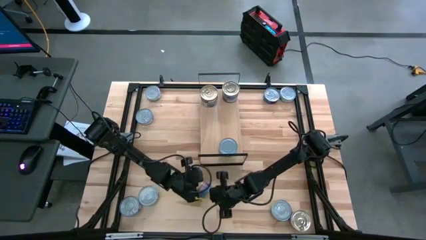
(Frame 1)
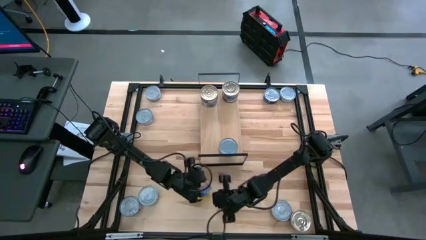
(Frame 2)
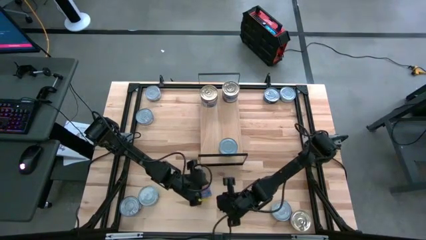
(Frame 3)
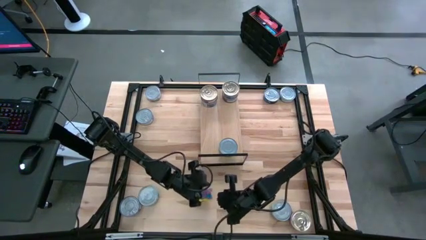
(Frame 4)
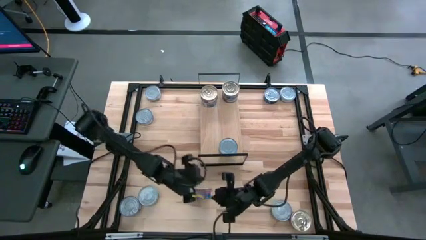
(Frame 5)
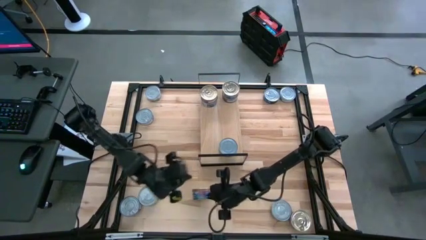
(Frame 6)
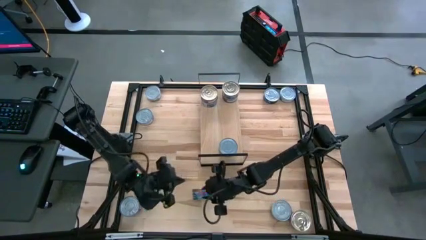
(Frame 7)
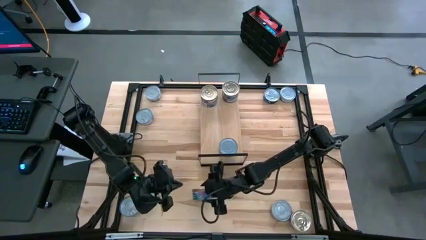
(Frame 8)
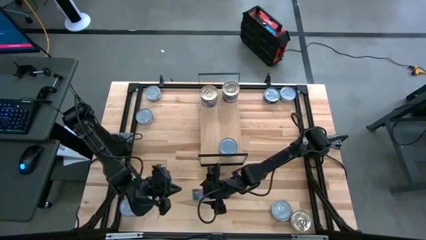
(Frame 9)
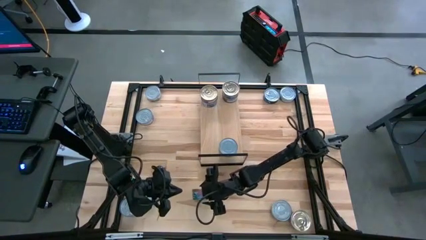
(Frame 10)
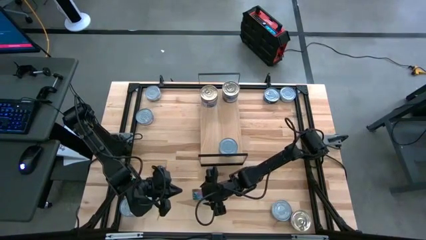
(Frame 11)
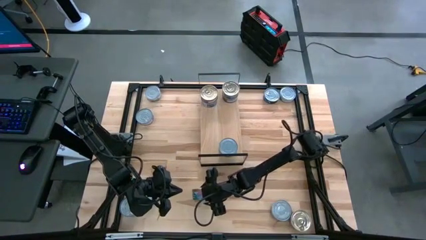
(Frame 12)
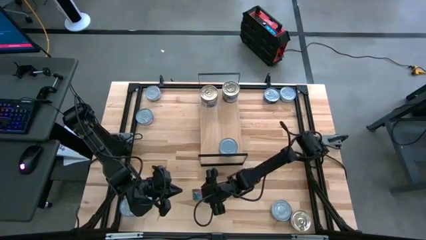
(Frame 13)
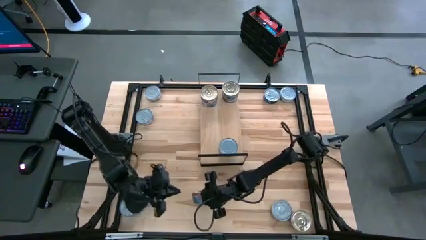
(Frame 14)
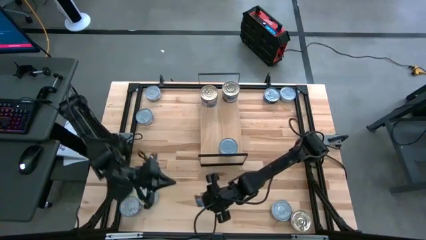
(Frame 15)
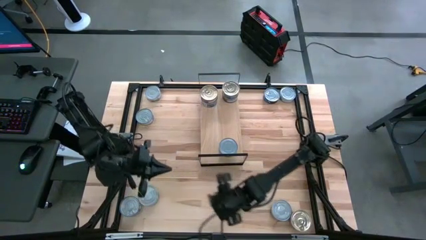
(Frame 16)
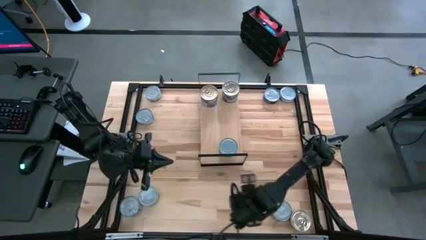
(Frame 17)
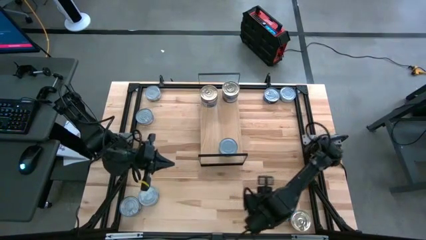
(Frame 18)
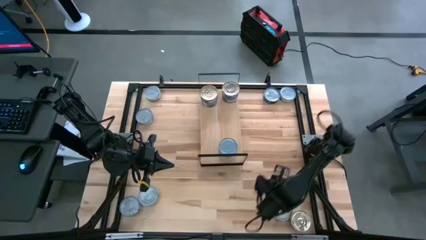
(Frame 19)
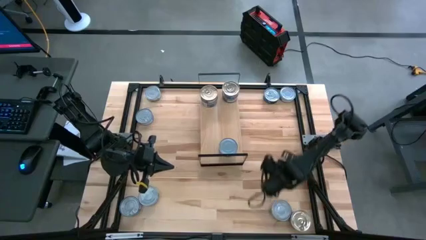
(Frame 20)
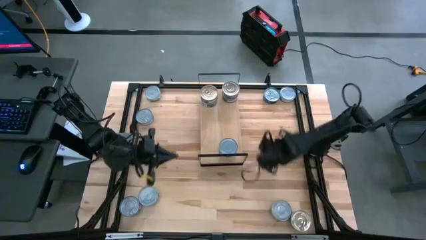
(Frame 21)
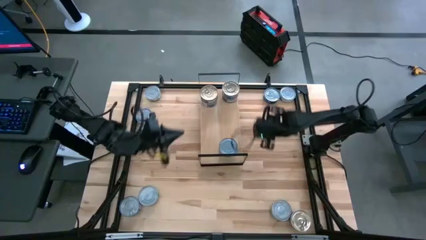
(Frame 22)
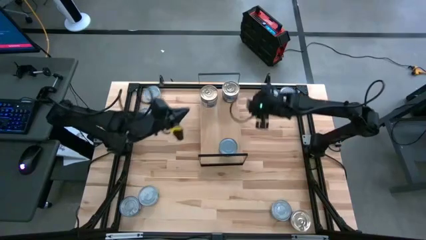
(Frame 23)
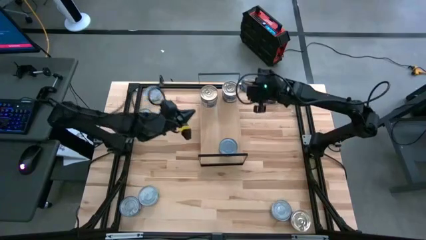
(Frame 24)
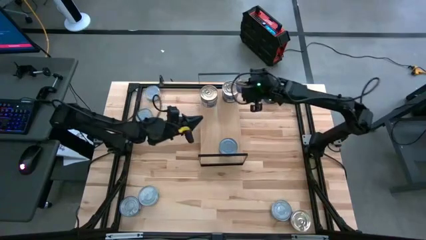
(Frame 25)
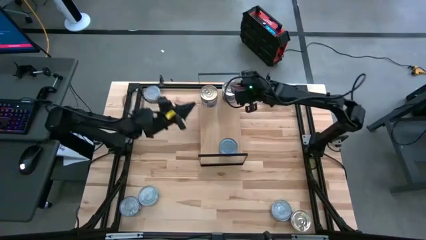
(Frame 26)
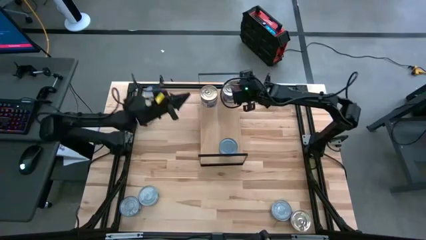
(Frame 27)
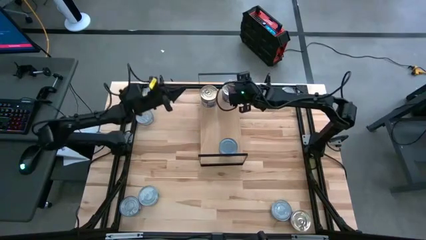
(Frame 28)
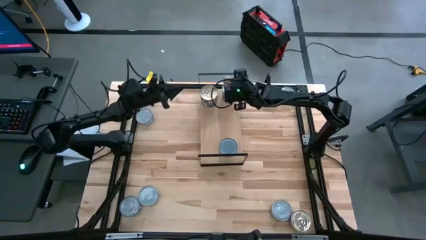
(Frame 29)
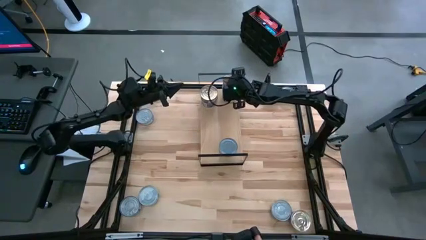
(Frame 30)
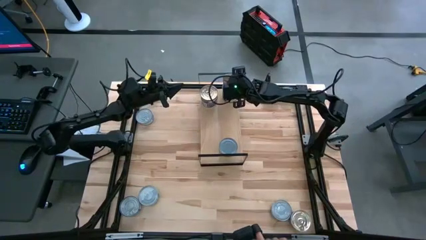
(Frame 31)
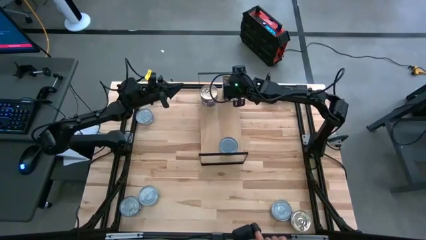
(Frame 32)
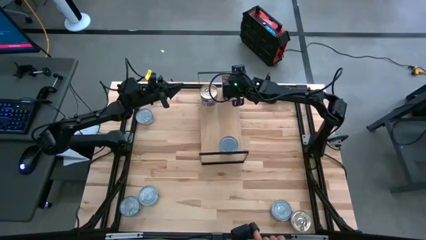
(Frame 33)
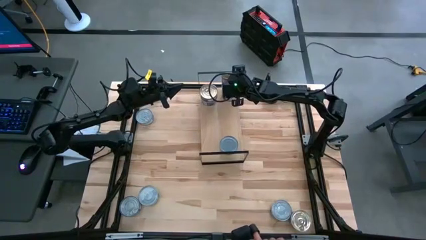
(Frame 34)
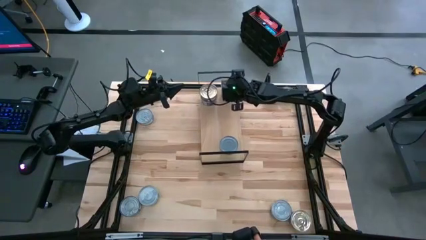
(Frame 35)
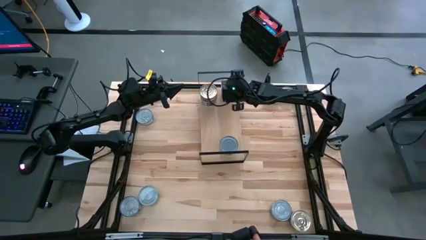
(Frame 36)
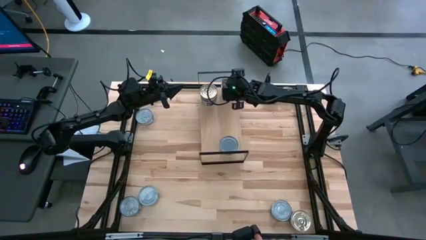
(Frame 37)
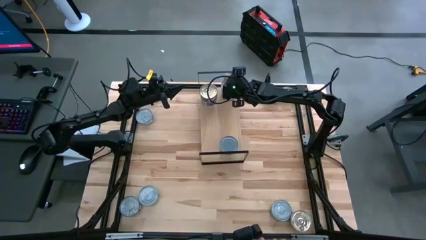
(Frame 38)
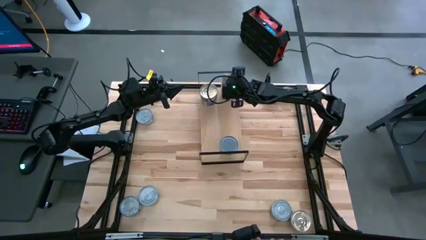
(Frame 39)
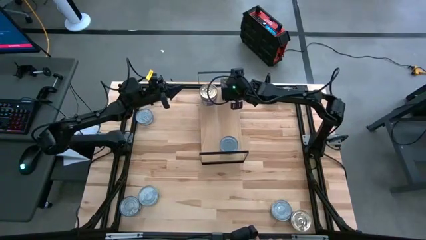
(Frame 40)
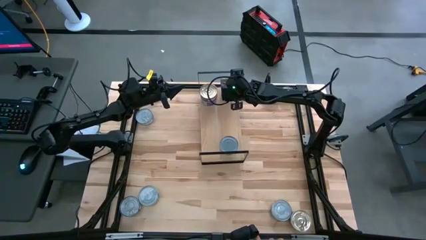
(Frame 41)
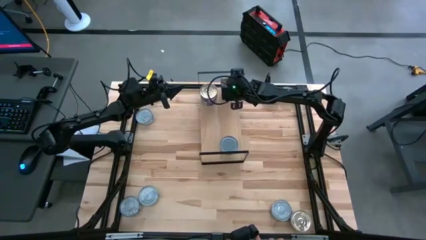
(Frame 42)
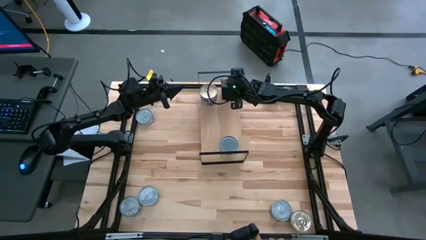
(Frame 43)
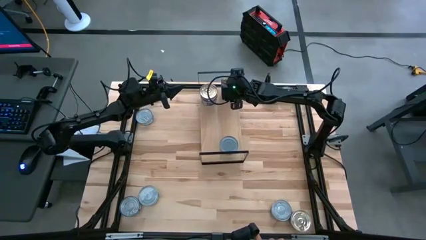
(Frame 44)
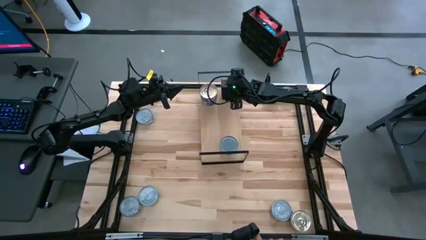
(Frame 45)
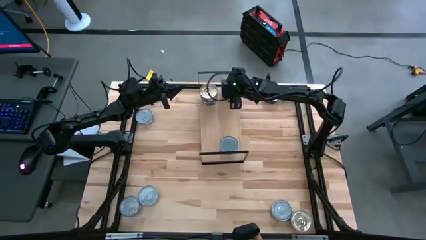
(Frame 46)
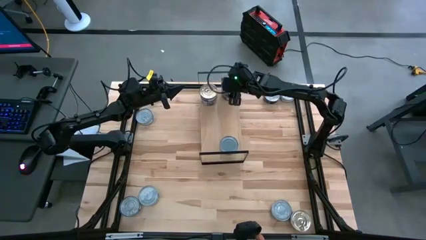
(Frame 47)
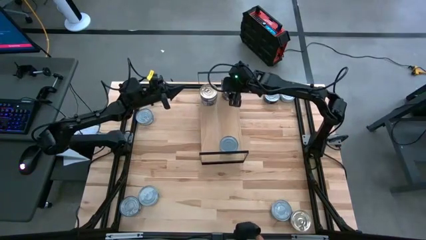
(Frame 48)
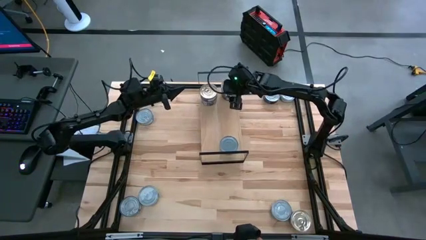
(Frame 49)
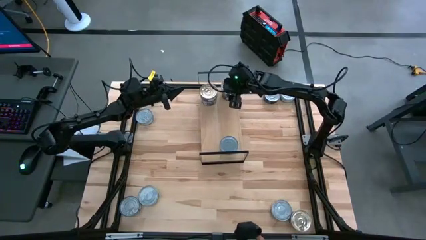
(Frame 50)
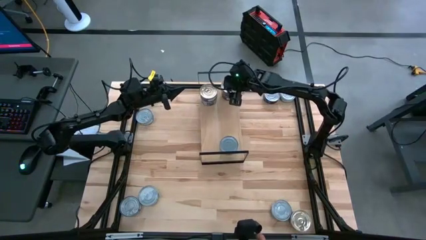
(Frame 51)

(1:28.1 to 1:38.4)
Task: Stack canned seafood by type on shelf
Stack the blue pink tuna can on top of the other blue pink tuna cans on the shelf

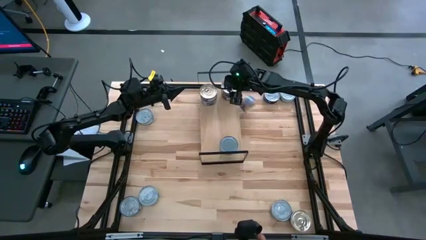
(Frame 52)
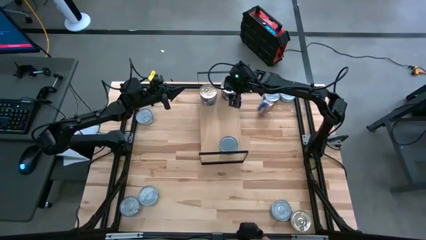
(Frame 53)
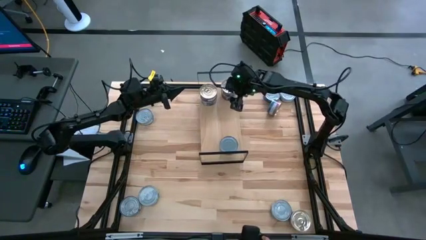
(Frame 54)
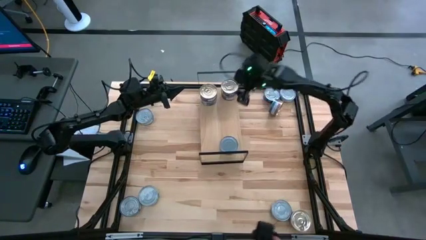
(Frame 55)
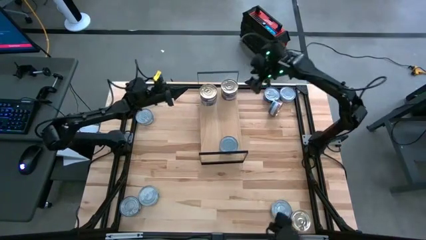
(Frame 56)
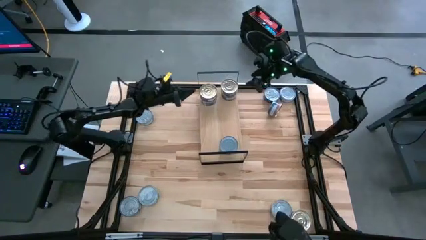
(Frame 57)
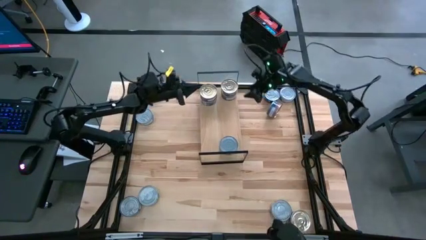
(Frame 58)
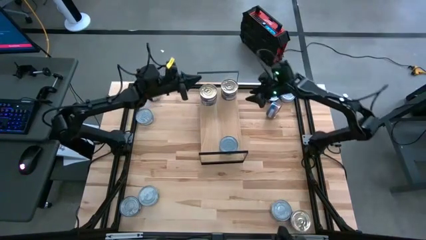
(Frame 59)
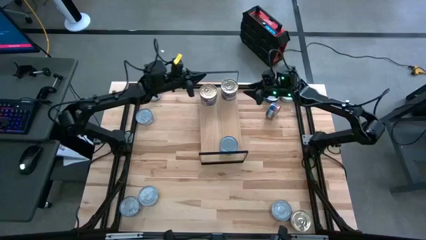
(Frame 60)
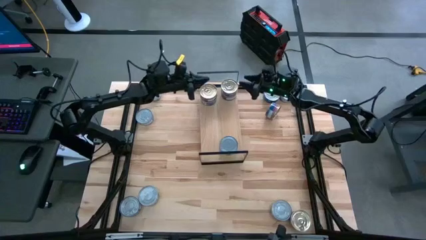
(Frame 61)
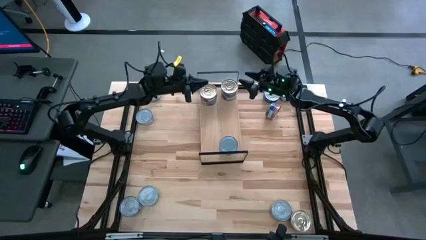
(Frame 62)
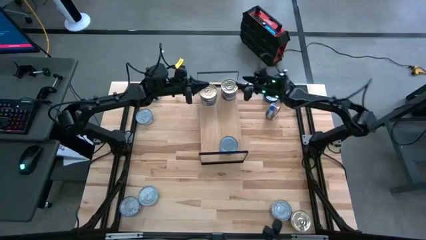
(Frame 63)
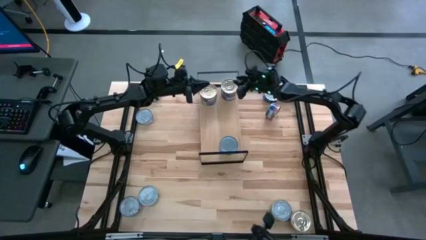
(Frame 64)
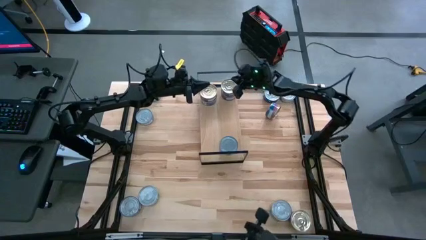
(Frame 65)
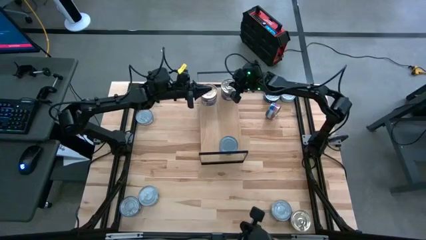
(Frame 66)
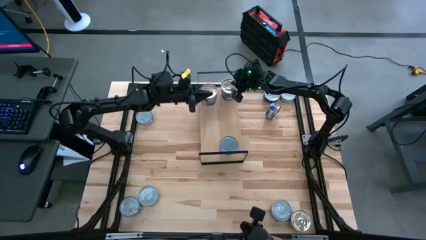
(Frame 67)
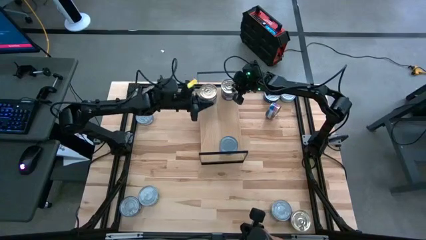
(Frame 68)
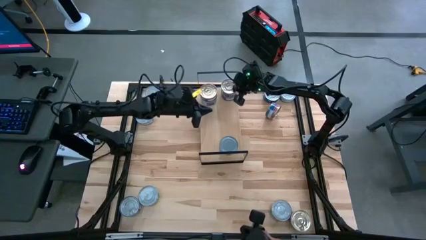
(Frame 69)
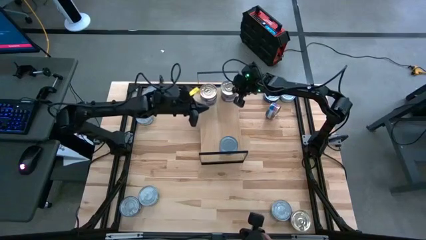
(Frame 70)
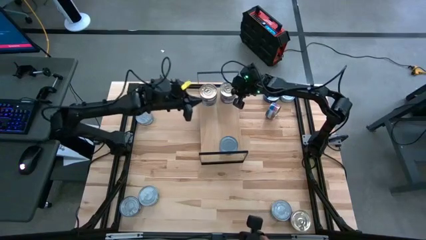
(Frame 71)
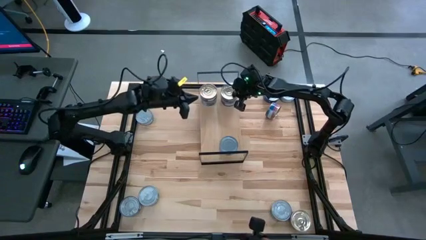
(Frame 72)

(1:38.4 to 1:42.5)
Adjust the blue pink tuna cans on the shelf
